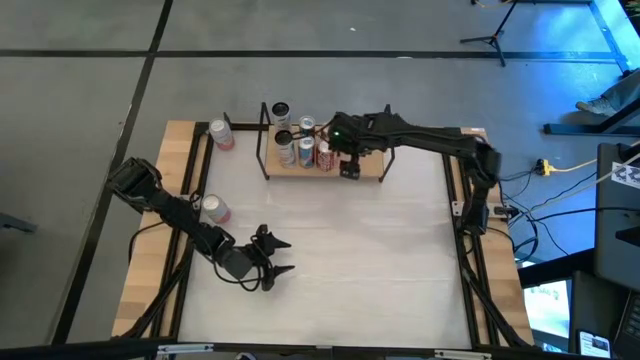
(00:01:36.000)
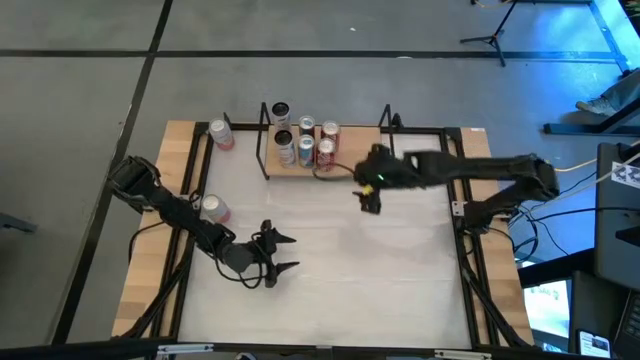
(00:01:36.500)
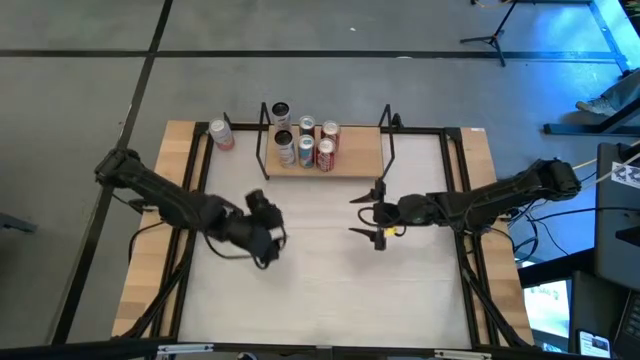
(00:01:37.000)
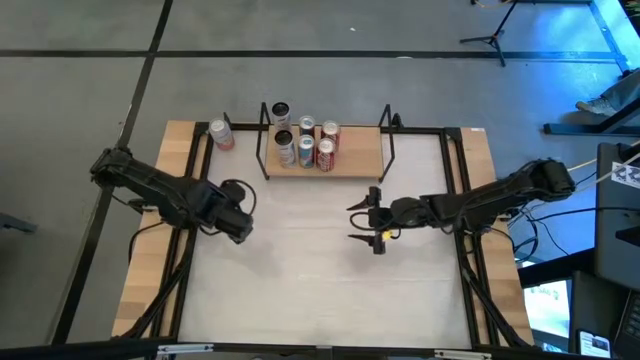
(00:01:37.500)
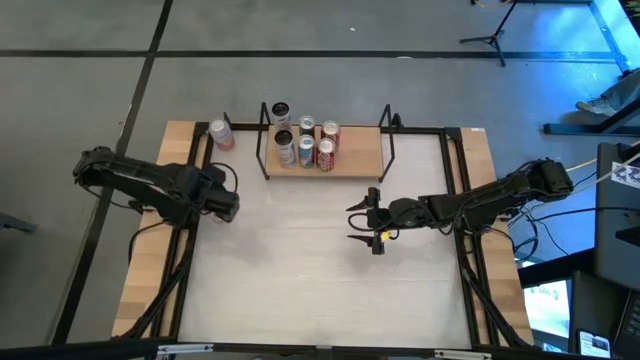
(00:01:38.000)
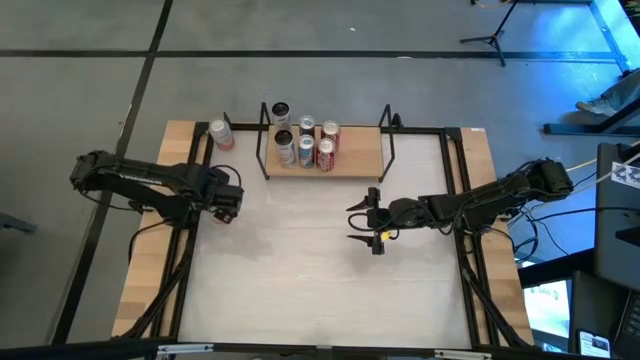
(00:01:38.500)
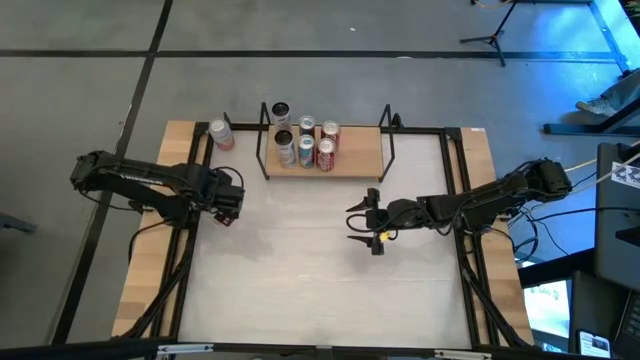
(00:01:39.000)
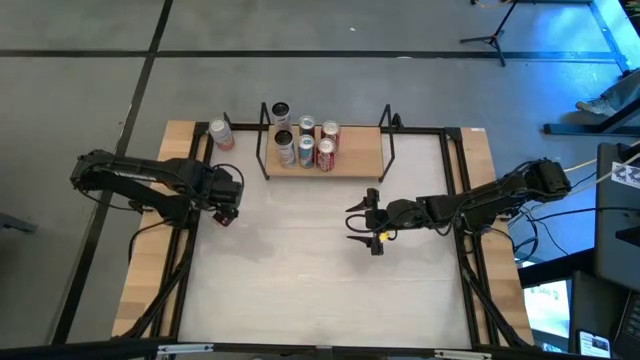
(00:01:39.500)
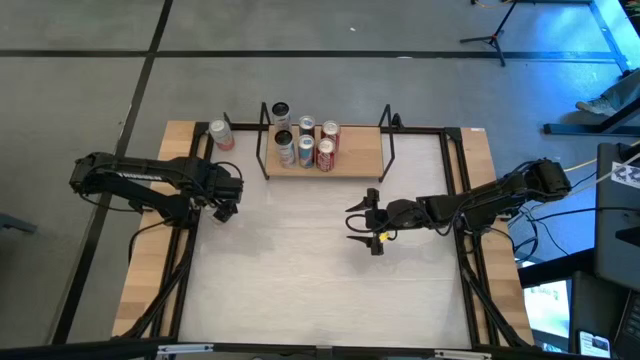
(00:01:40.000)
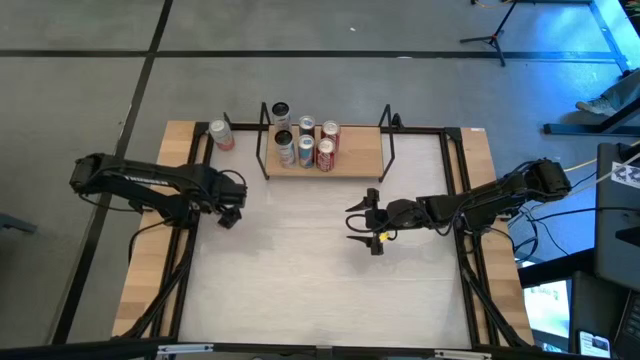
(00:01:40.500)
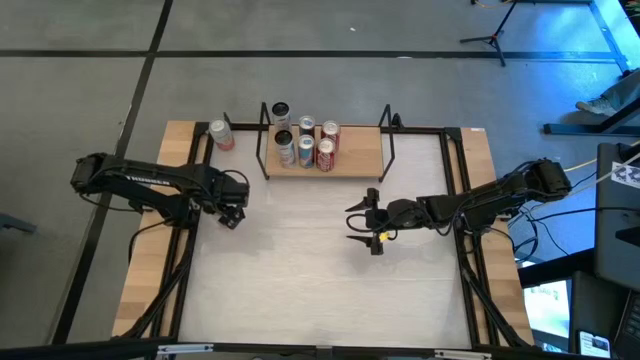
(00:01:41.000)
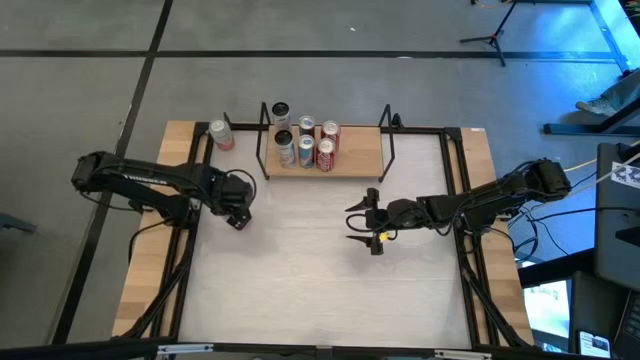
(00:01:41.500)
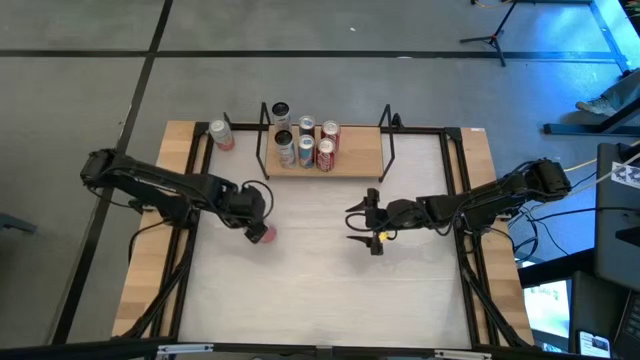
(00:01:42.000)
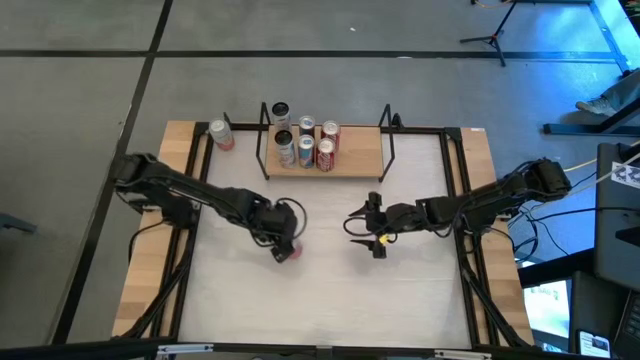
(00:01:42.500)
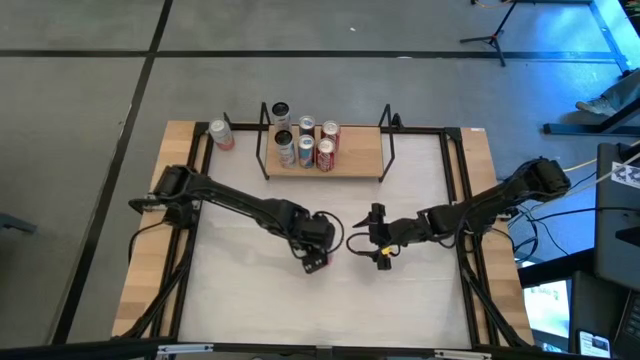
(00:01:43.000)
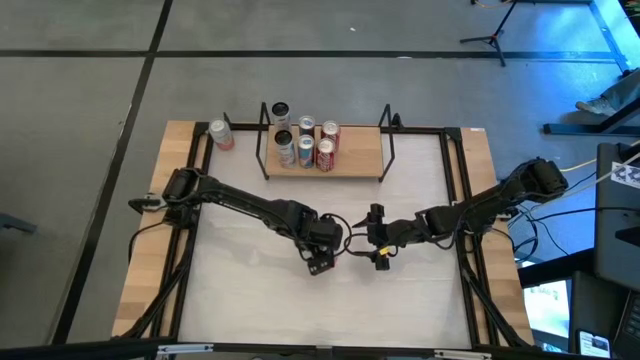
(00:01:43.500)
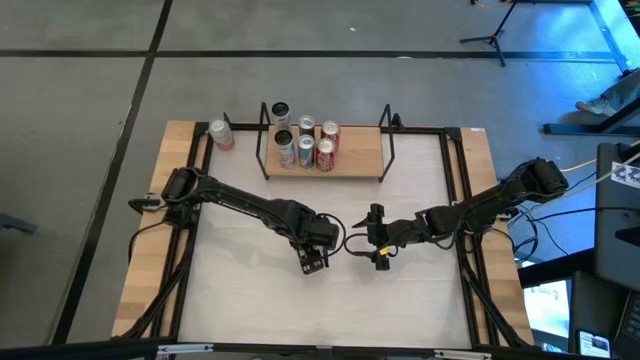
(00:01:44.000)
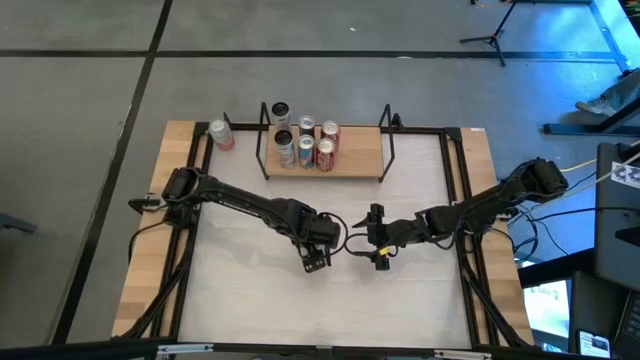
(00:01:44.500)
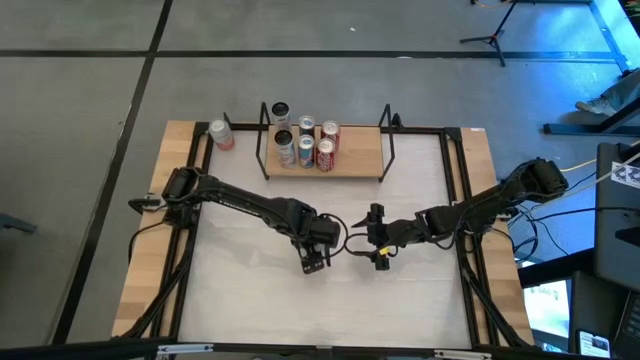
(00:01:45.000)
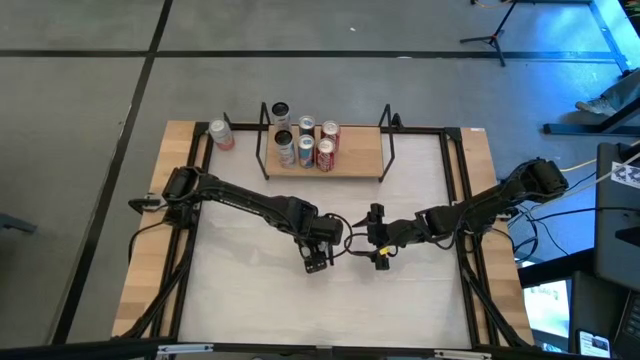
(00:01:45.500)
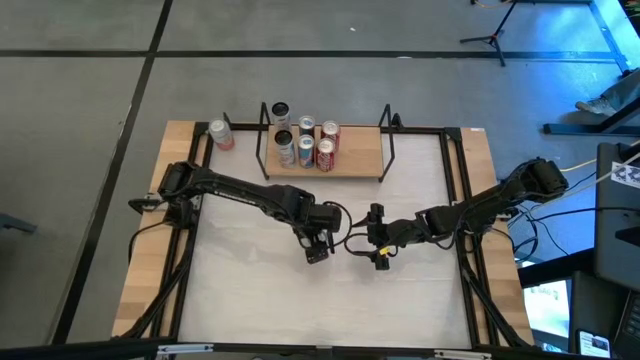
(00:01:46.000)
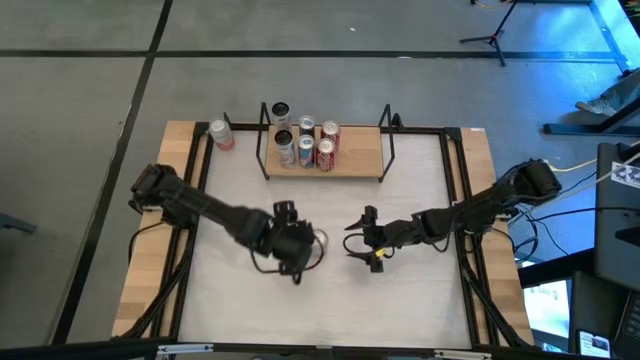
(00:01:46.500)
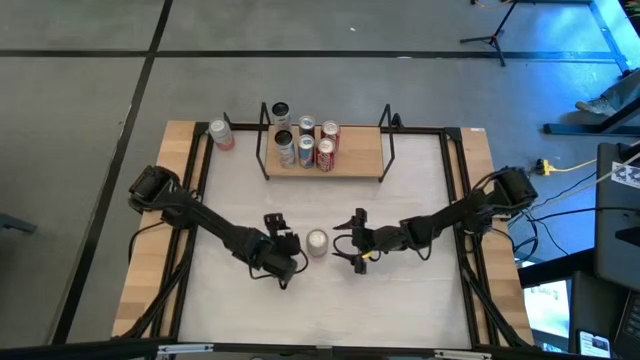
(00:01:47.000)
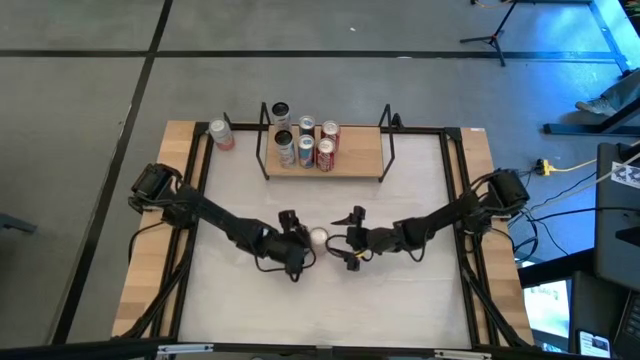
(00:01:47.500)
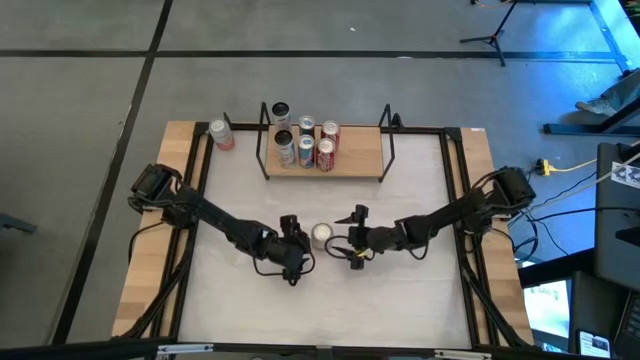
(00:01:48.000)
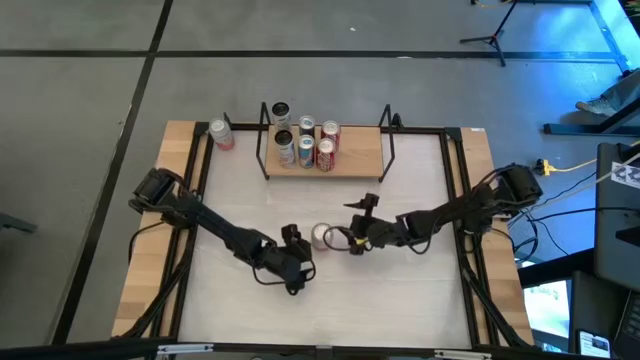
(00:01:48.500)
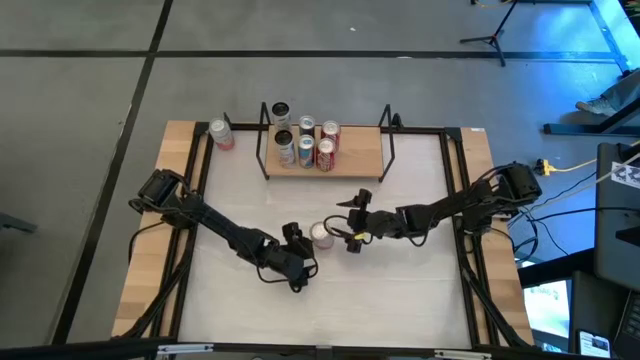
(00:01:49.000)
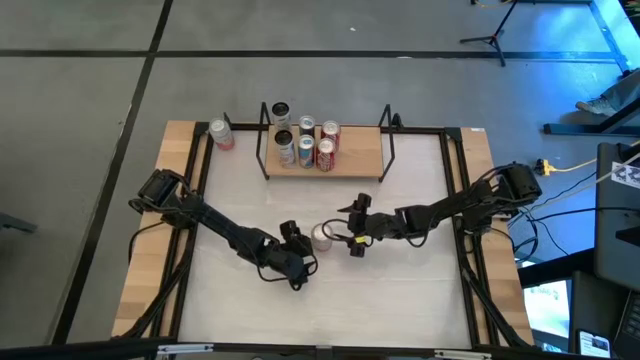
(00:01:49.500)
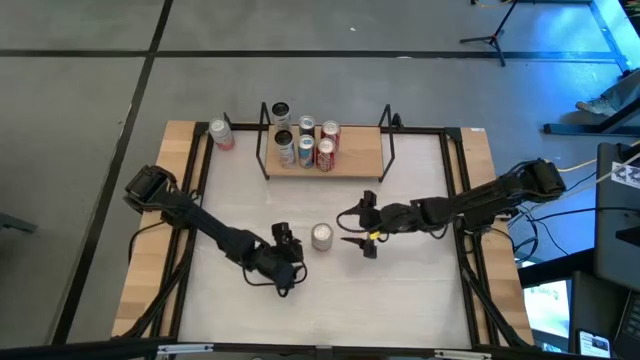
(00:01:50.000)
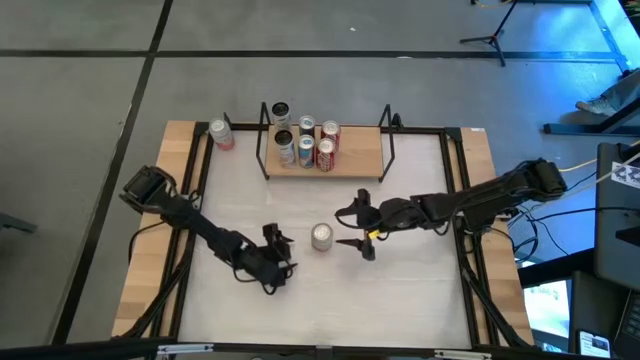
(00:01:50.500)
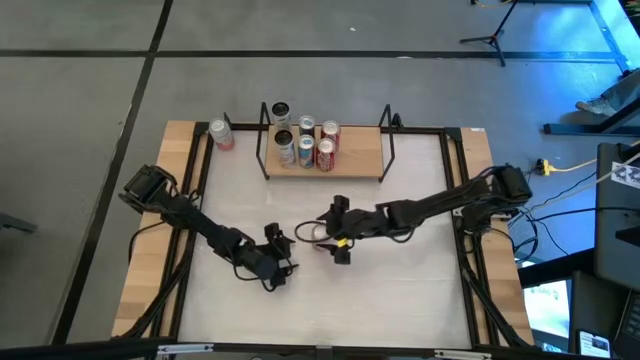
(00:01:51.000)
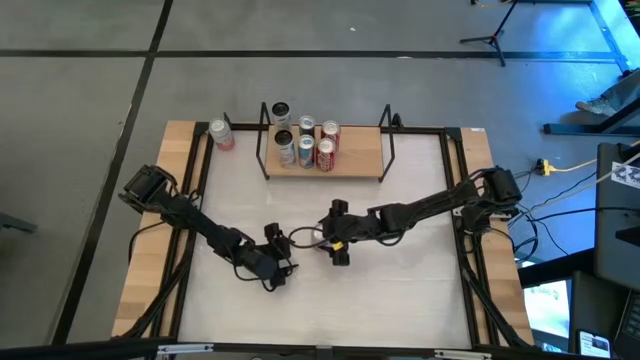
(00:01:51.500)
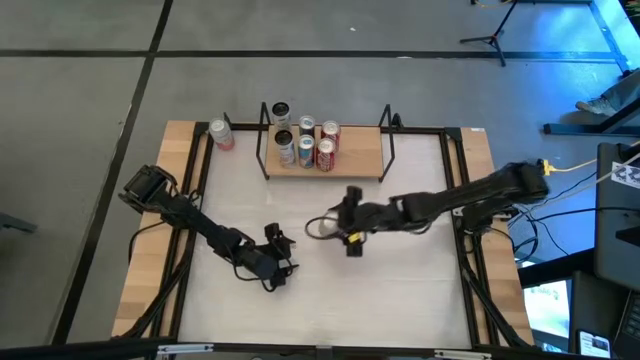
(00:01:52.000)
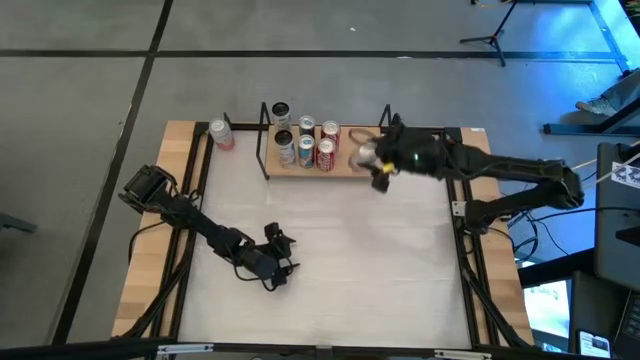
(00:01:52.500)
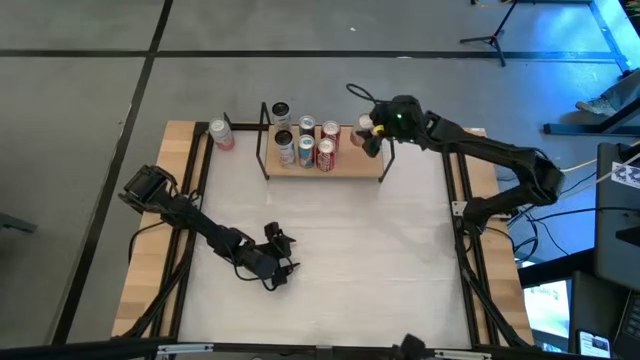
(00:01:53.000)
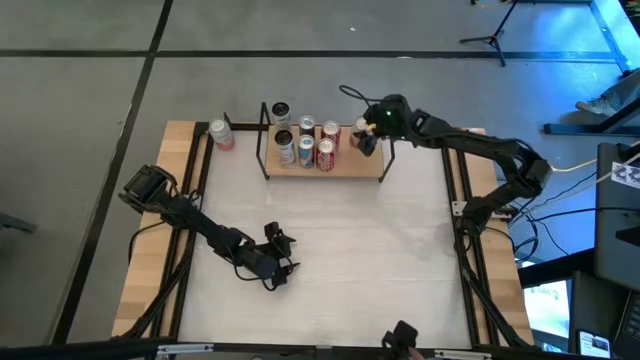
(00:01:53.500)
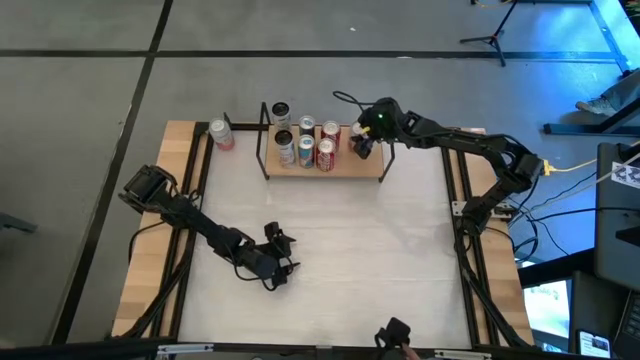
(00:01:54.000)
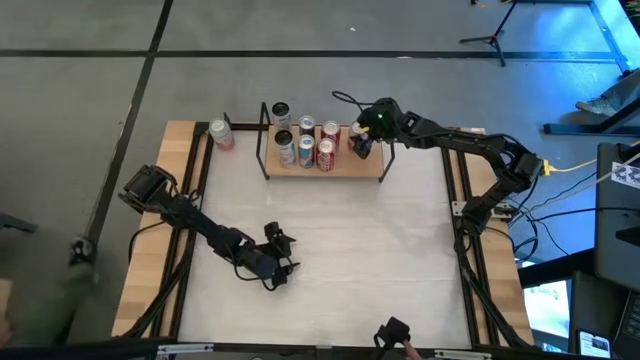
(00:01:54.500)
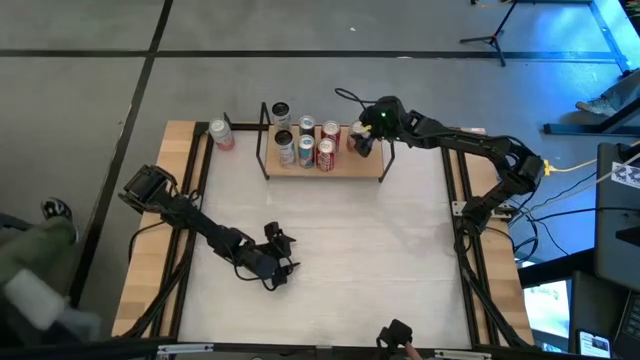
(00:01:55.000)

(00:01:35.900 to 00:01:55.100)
Task: Place canned beverage on shelf
Put the bottom orange-white soda can on the shelf
